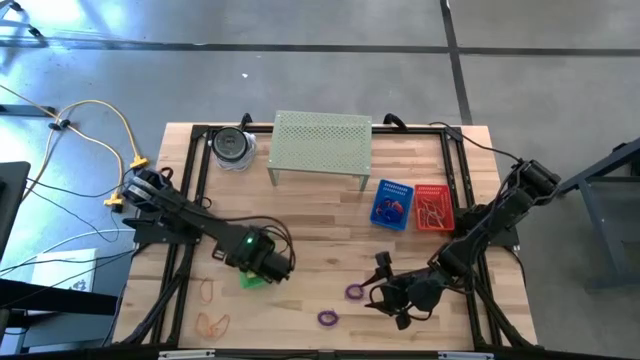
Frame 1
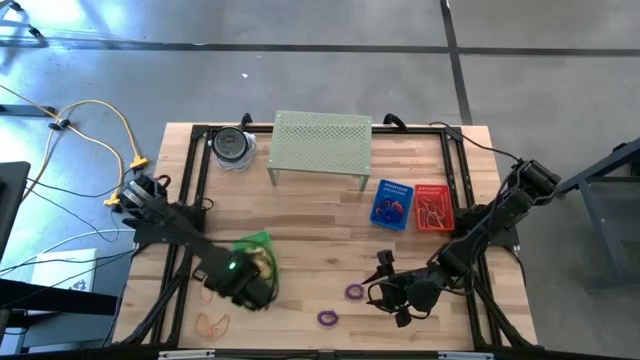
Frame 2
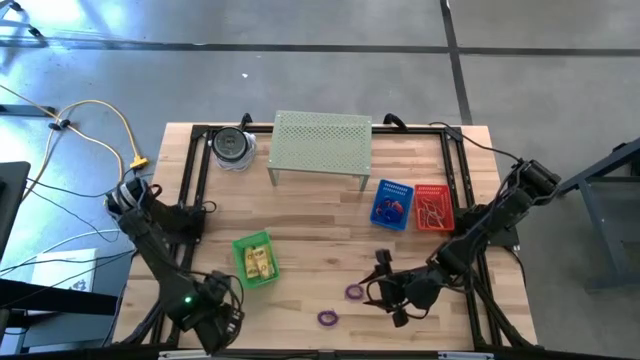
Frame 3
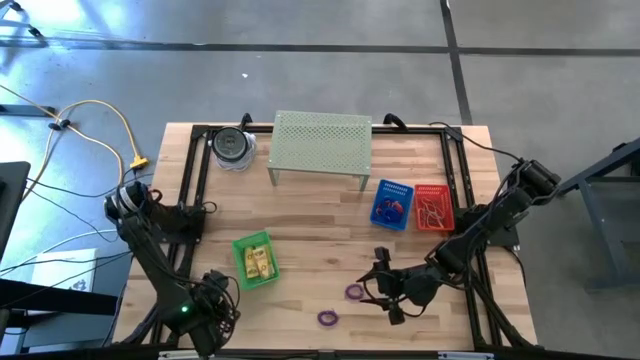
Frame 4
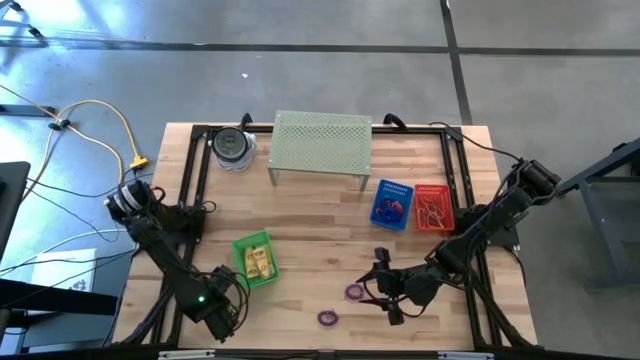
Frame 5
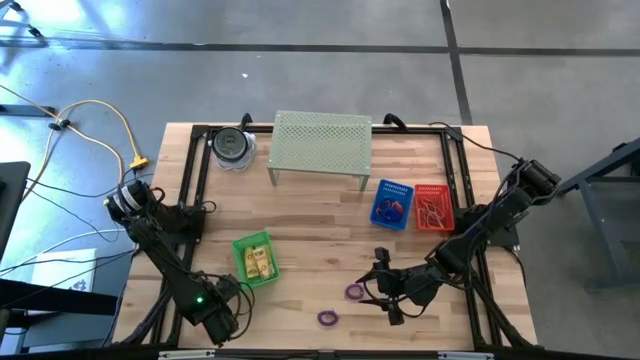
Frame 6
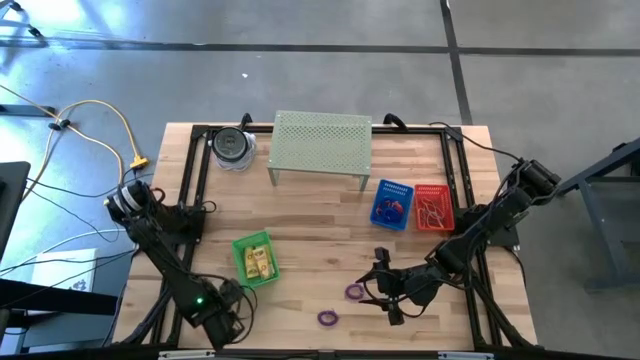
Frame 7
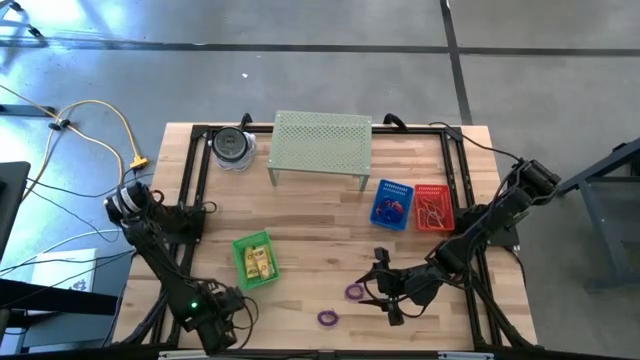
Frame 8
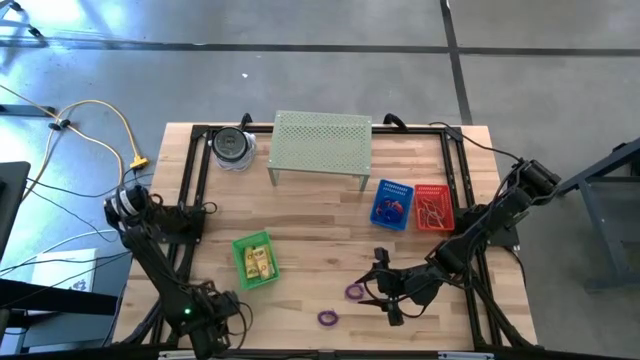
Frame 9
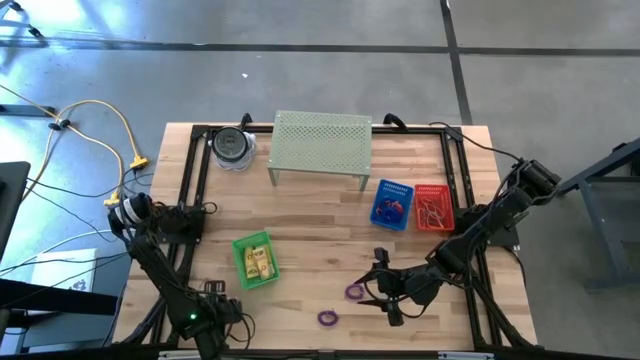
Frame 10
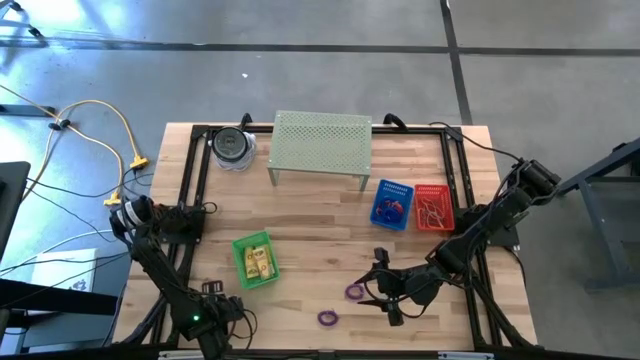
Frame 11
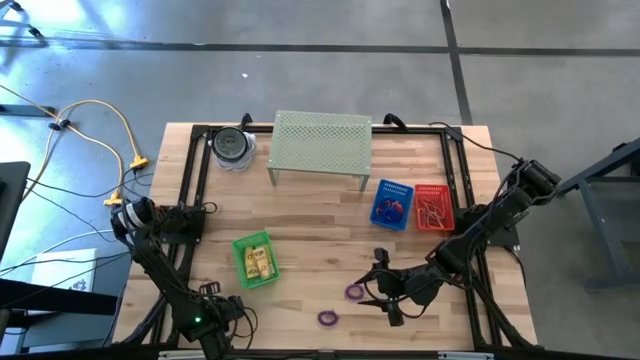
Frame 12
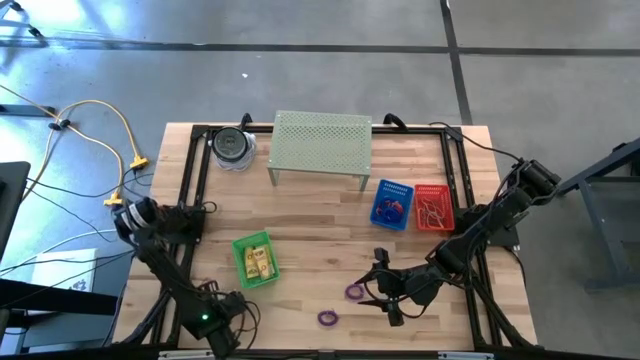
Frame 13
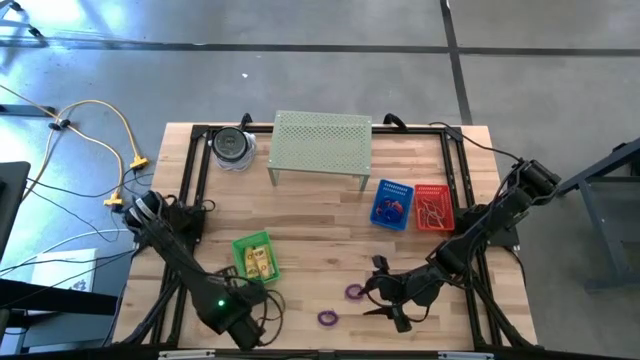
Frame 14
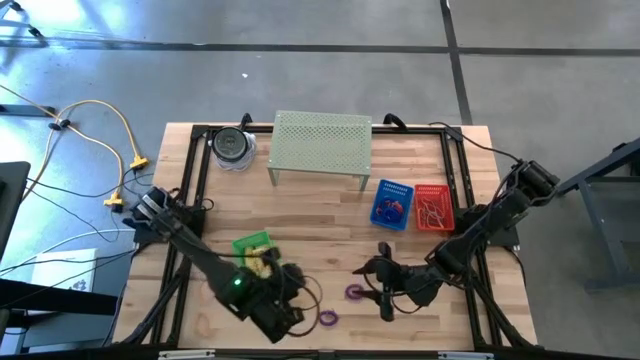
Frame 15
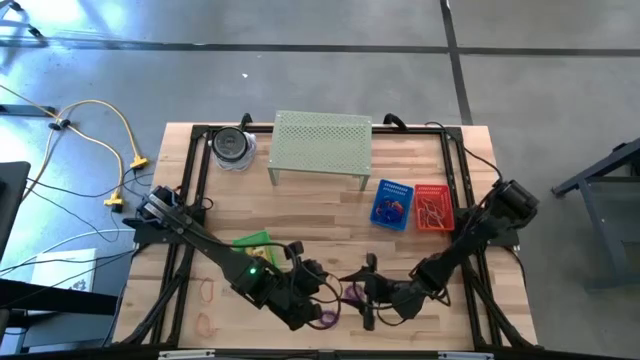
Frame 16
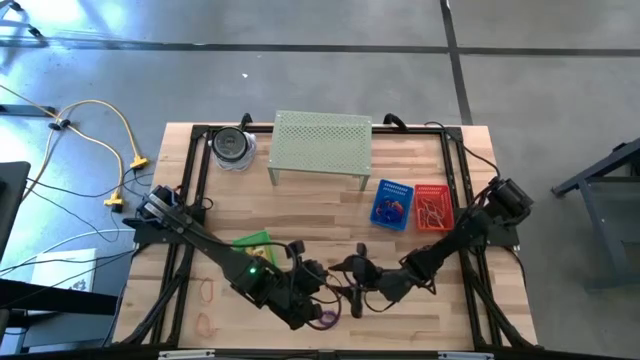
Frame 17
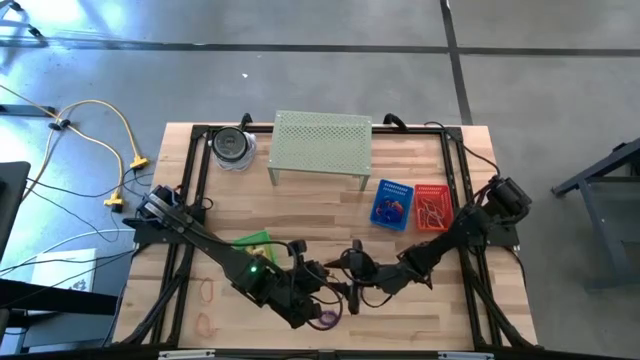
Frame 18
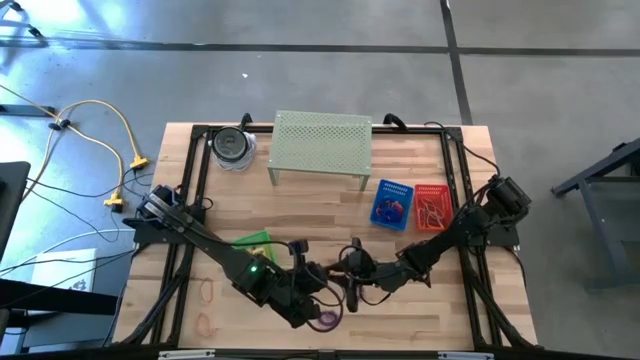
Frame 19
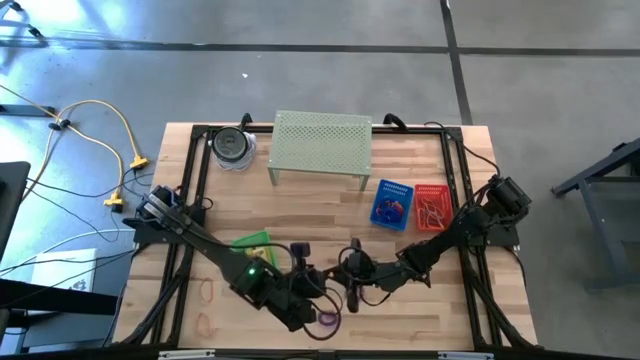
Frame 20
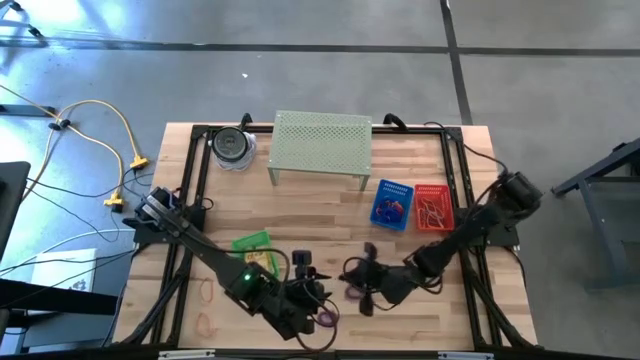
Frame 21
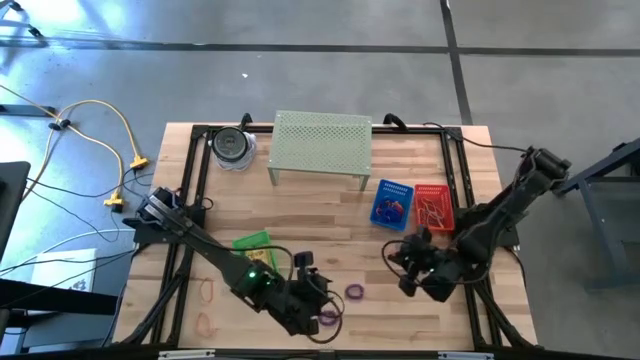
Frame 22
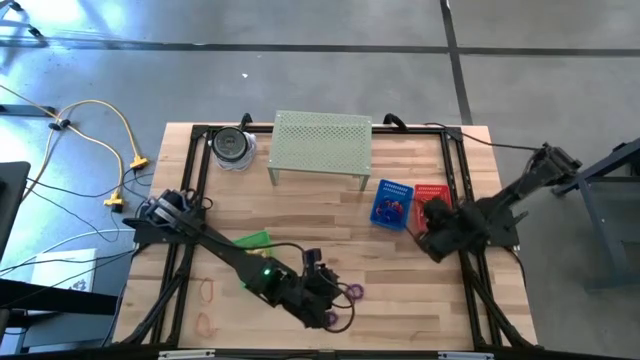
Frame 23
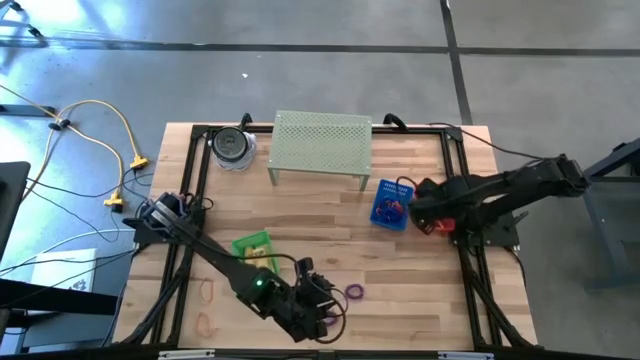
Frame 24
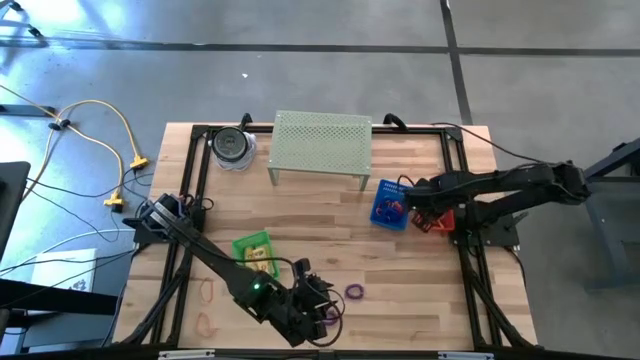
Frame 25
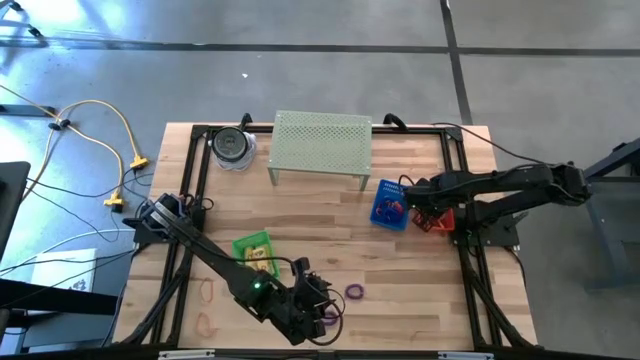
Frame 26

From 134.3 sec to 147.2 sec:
Task: Pick & Place Office Desk Supplies
Put the orange rubber band into the red bin

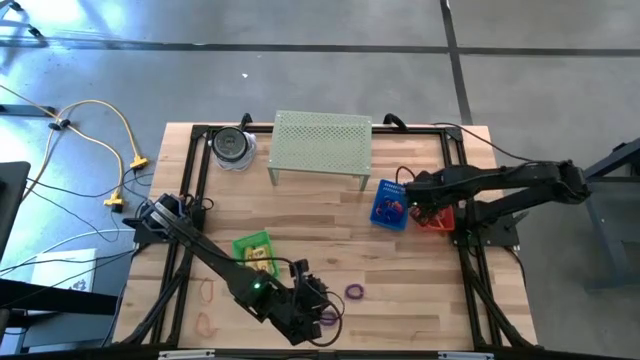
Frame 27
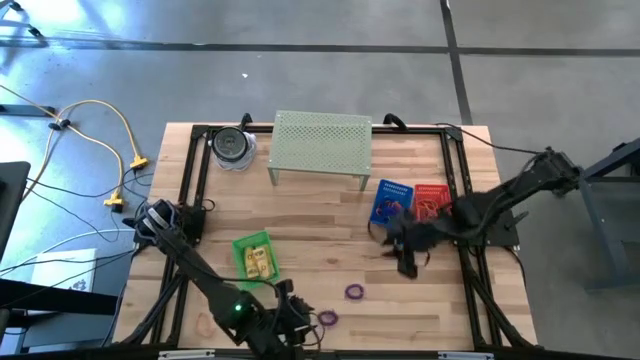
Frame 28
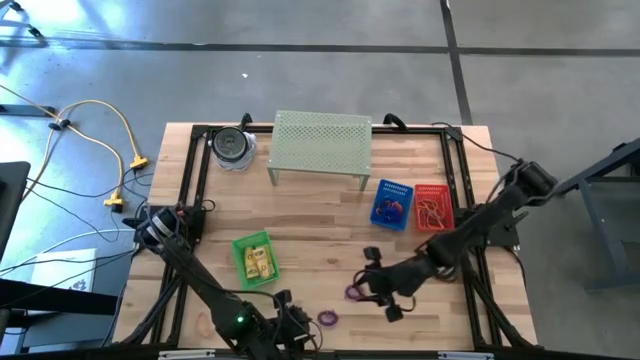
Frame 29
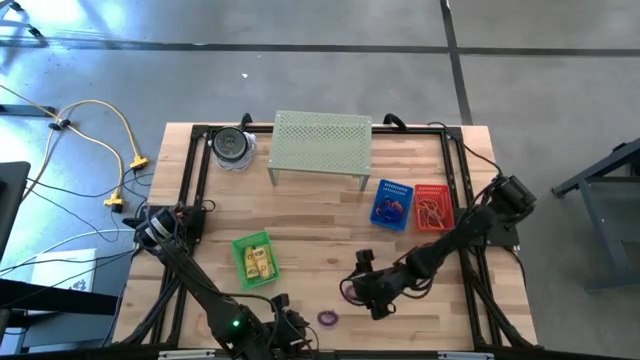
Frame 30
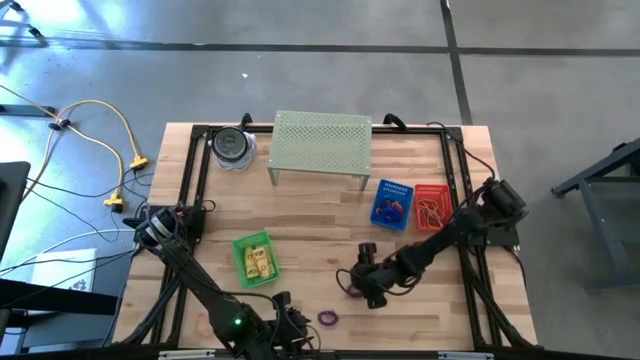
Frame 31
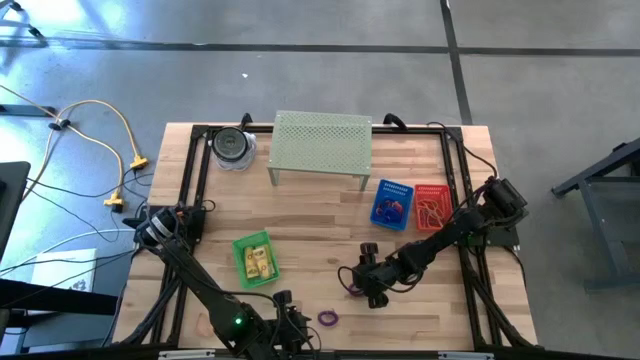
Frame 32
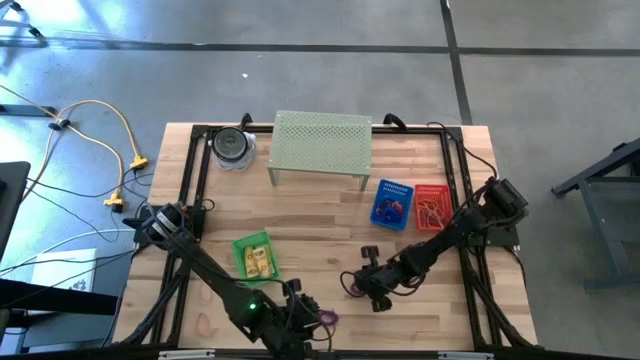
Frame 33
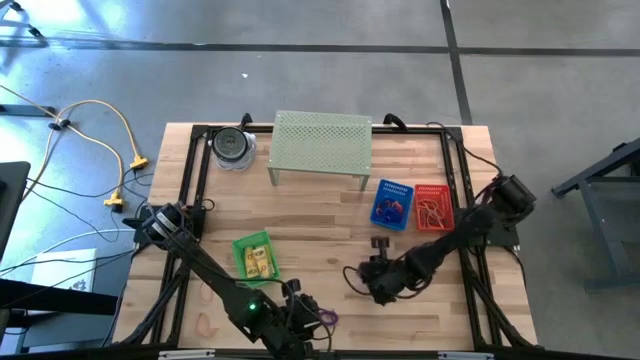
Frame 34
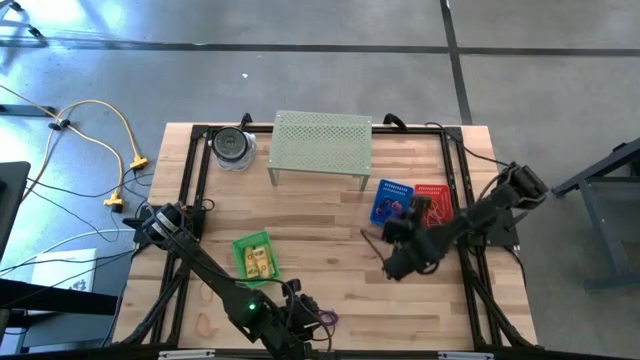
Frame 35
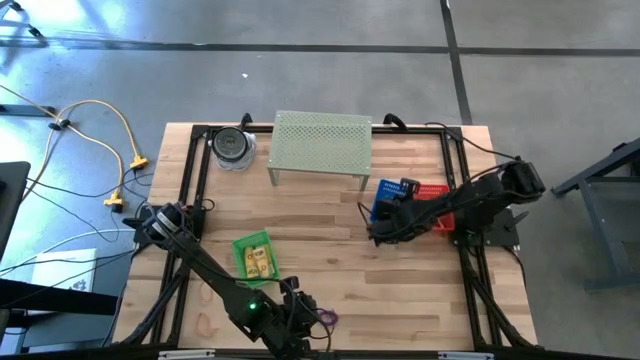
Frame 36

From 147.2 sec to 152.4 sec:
Put the violet spring keychain into the blue bin

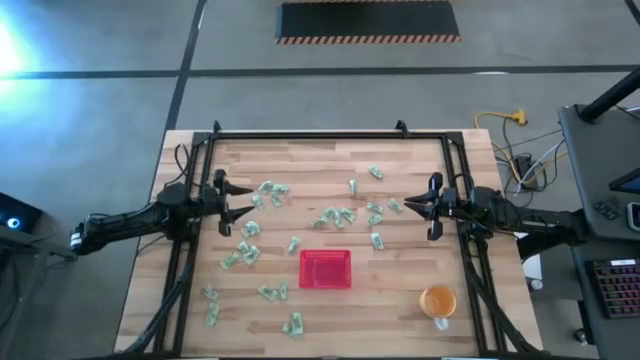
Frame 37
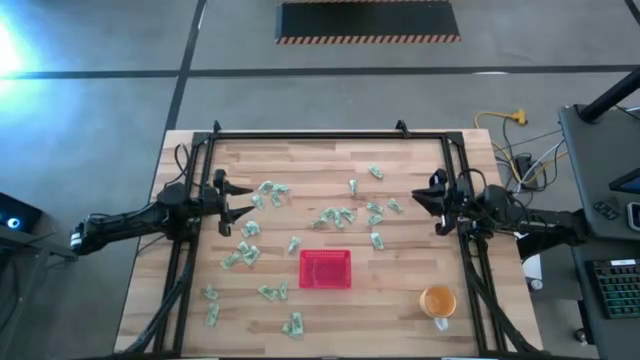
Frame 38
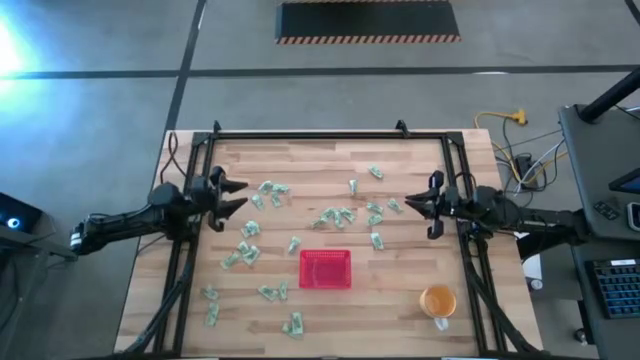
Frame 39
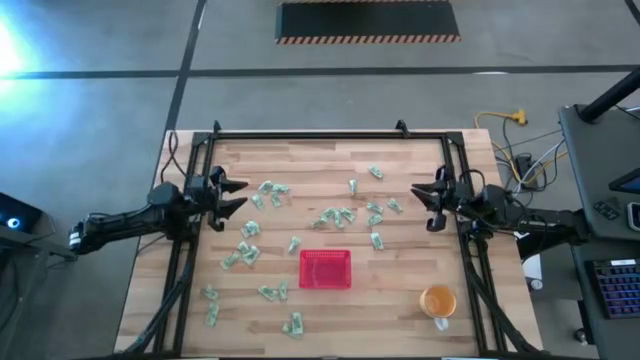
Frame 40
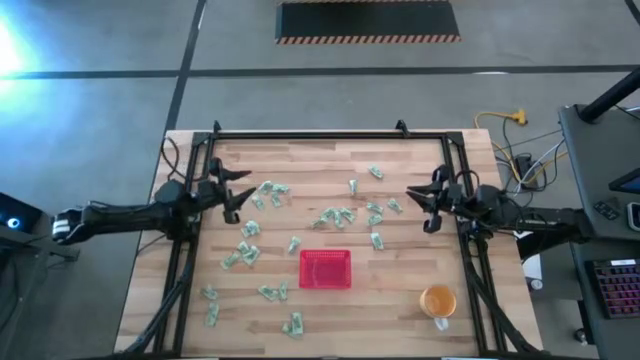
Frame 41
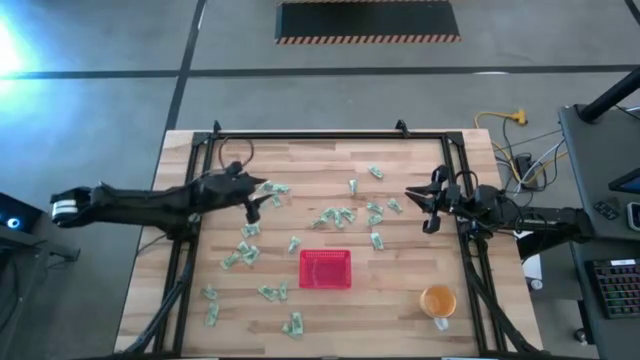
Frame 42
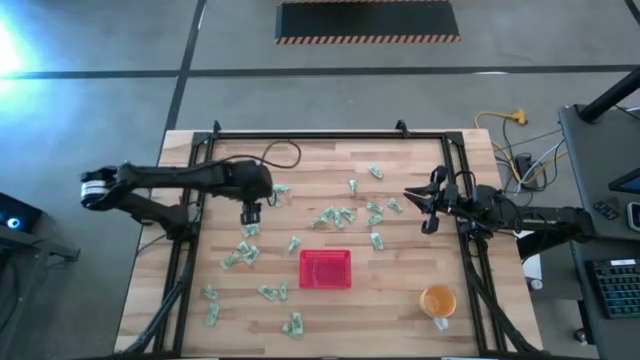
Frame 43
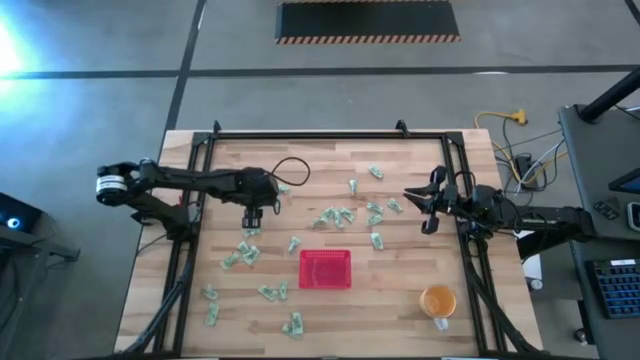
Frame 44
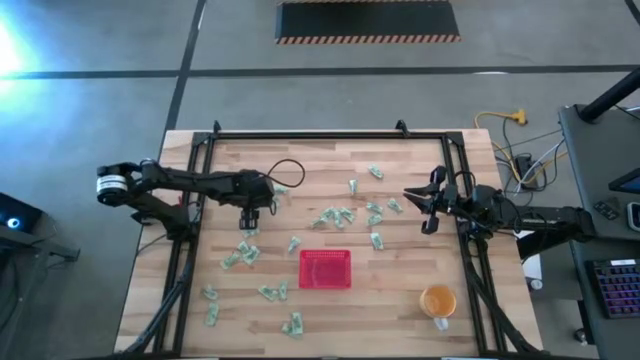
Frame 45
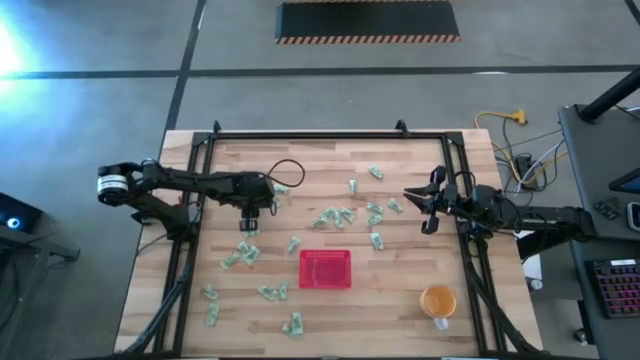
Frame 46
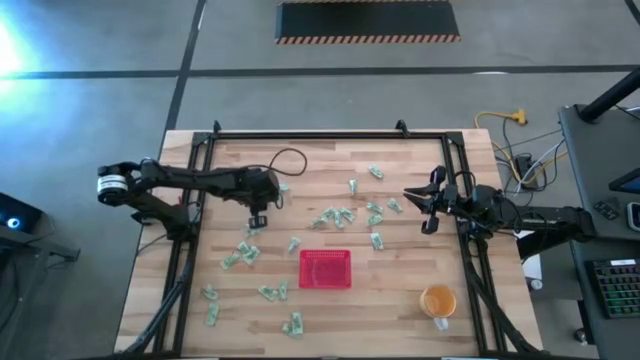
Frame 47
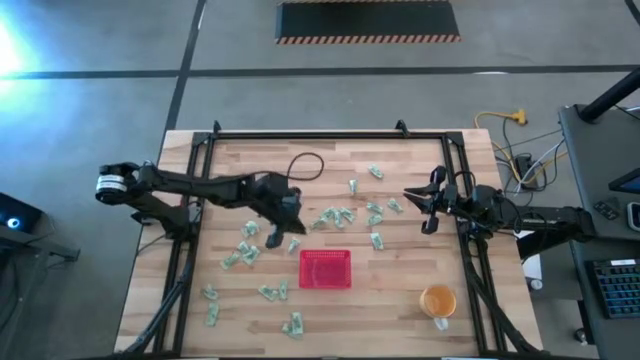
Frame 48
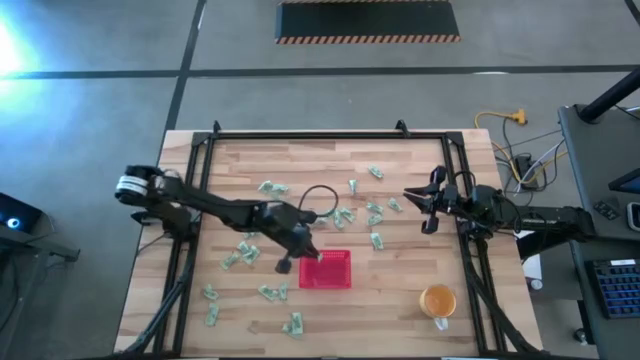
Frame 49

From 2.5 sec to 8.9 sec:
Task: Pick and place Stevia / Truvia into bins
Put the white stevia packet into the red bin
